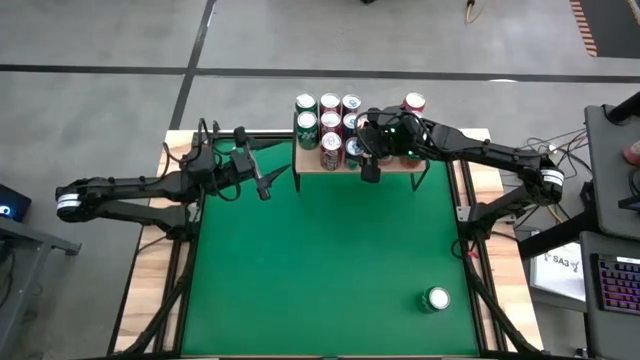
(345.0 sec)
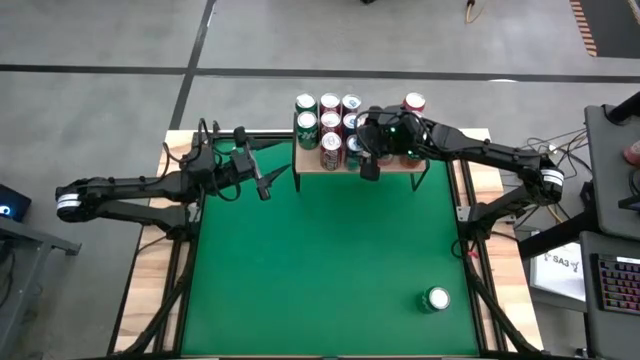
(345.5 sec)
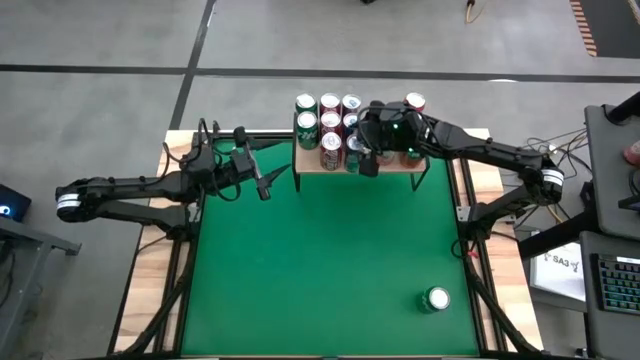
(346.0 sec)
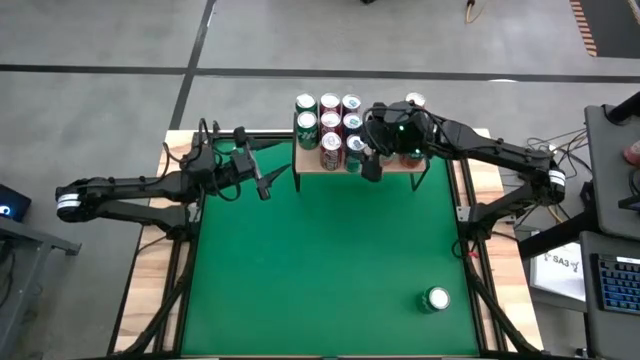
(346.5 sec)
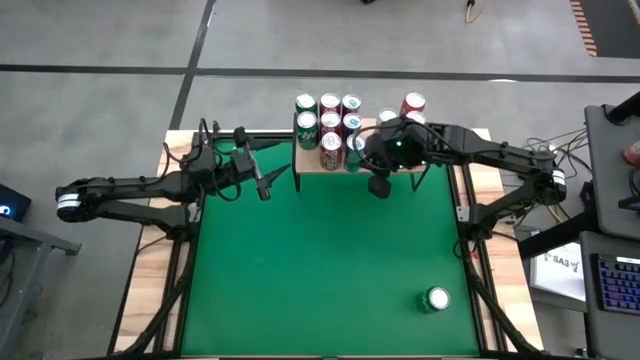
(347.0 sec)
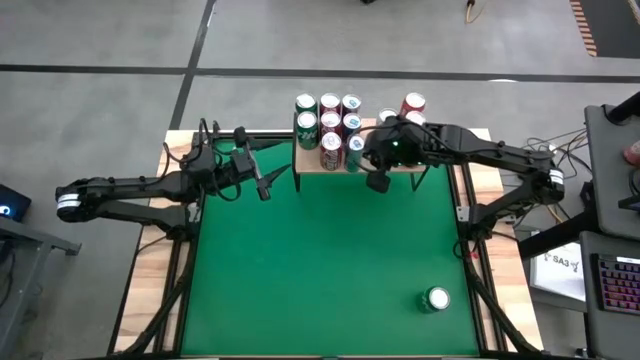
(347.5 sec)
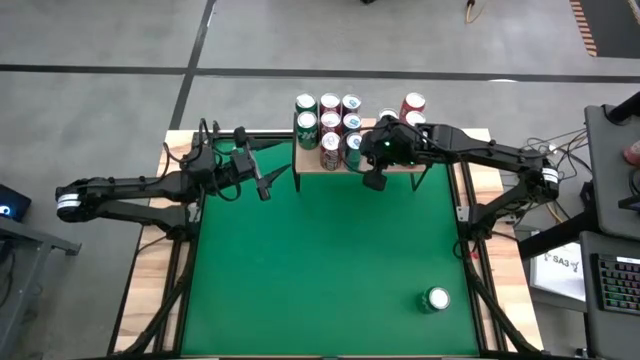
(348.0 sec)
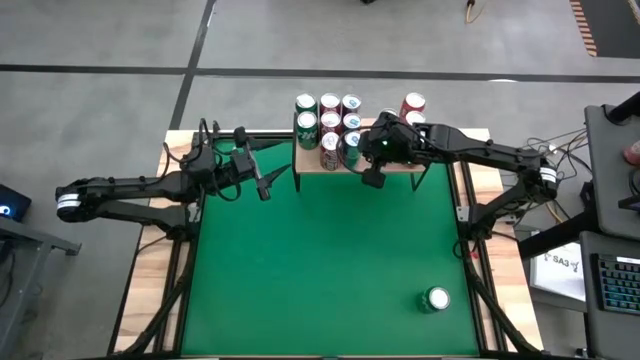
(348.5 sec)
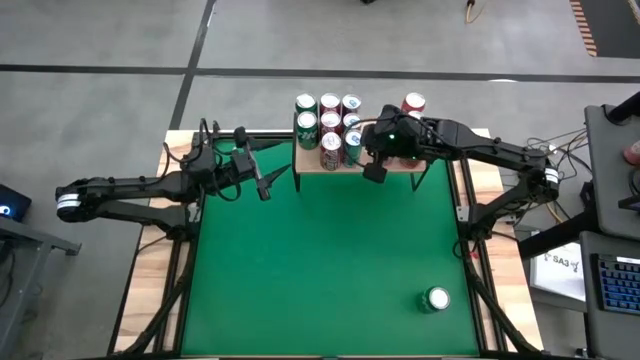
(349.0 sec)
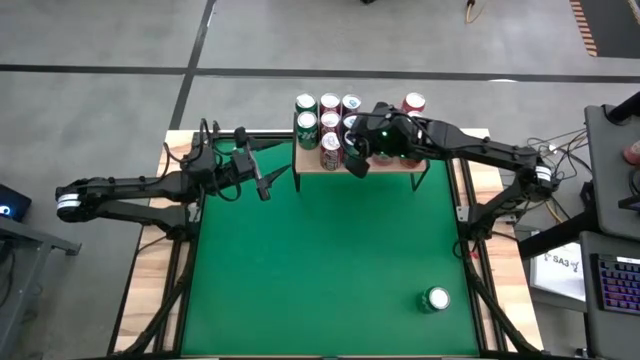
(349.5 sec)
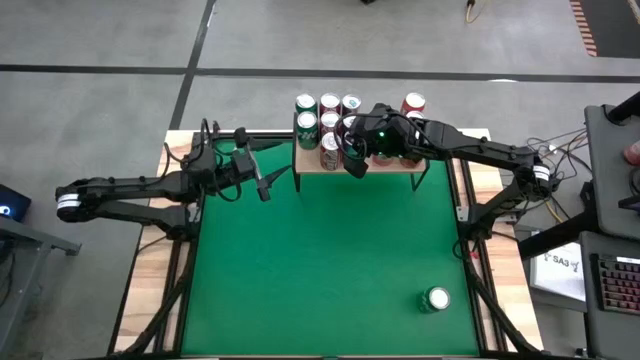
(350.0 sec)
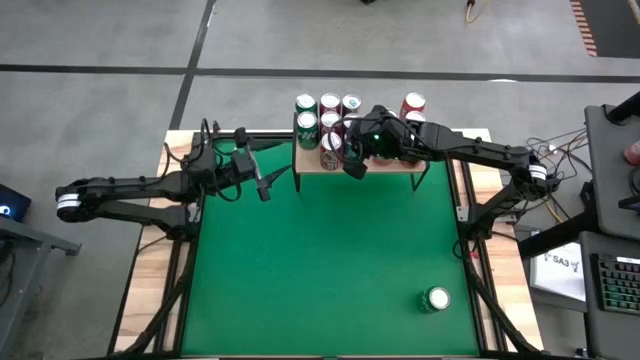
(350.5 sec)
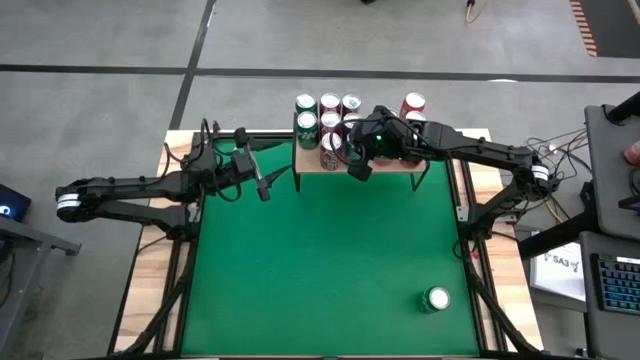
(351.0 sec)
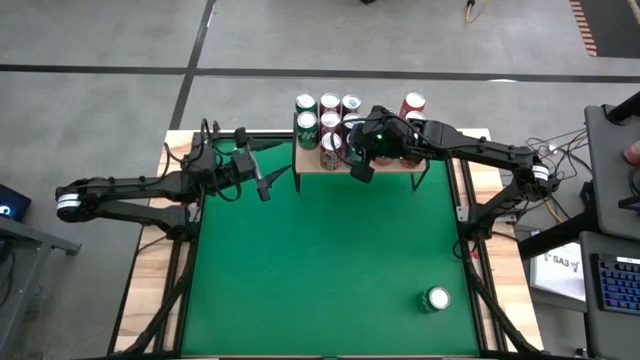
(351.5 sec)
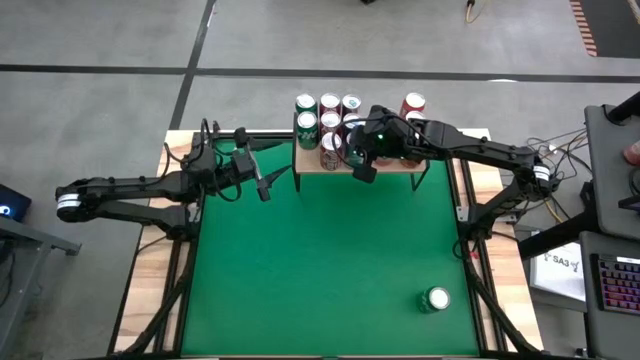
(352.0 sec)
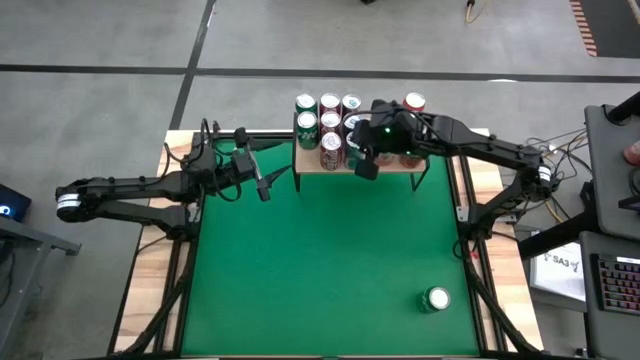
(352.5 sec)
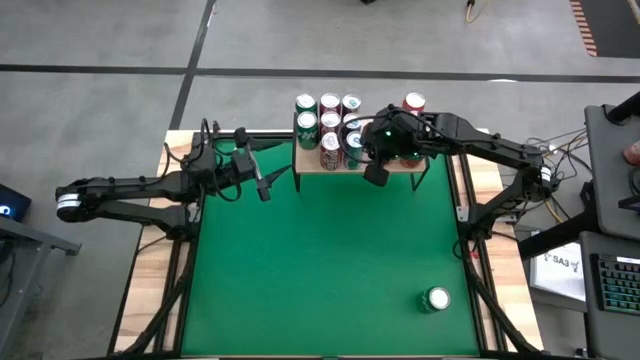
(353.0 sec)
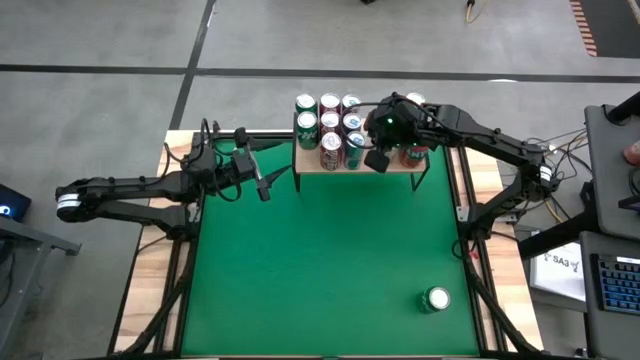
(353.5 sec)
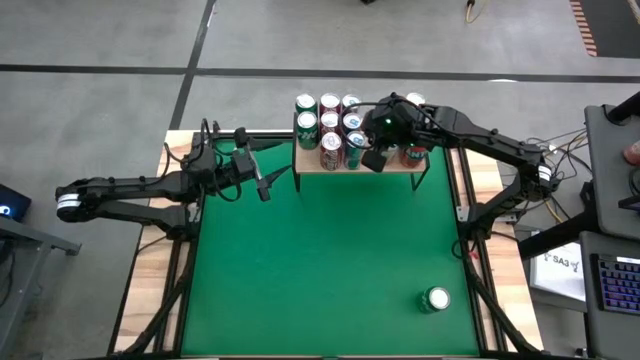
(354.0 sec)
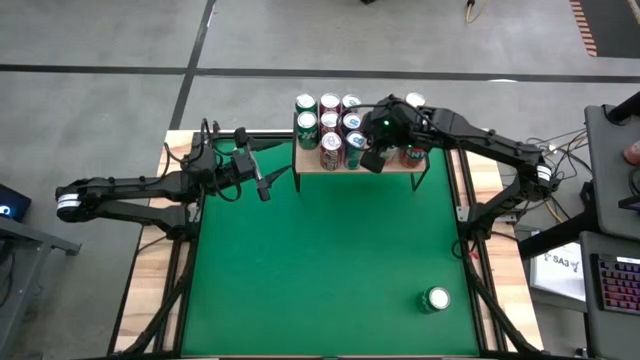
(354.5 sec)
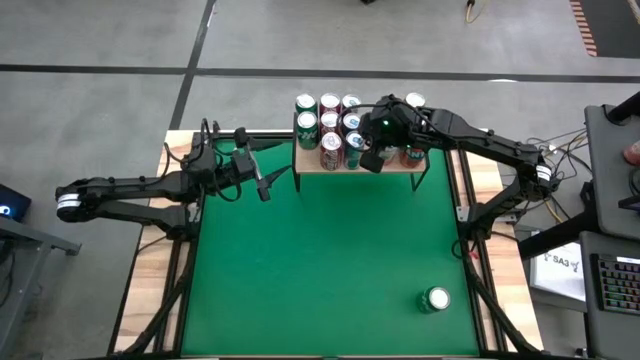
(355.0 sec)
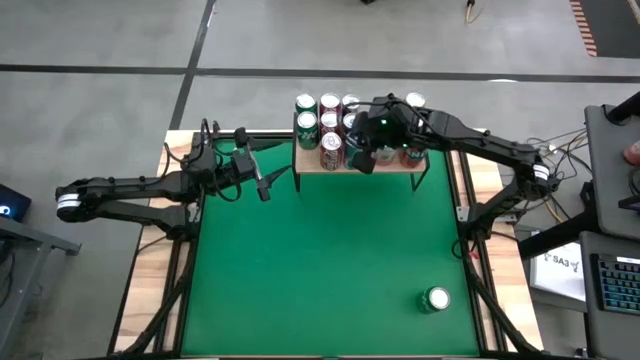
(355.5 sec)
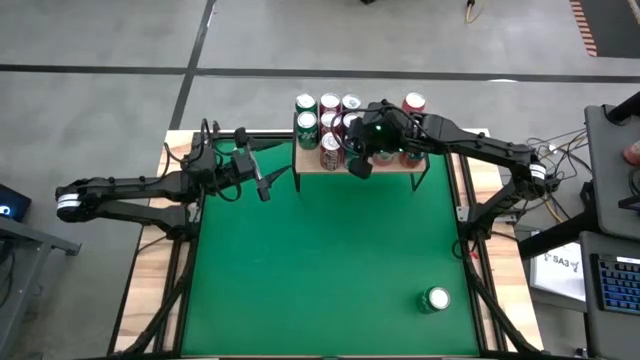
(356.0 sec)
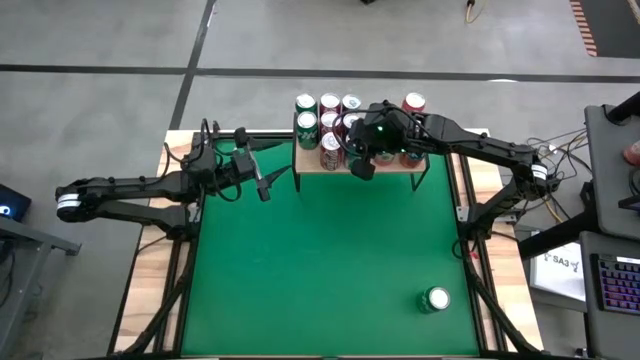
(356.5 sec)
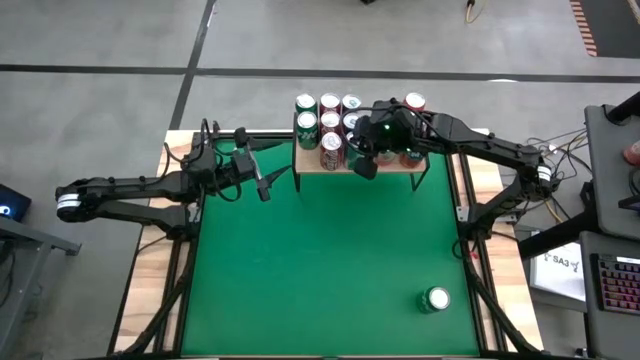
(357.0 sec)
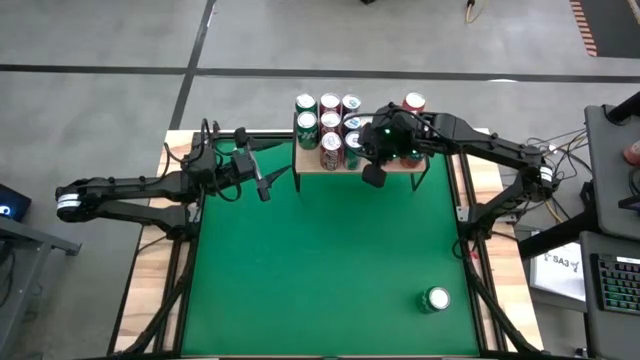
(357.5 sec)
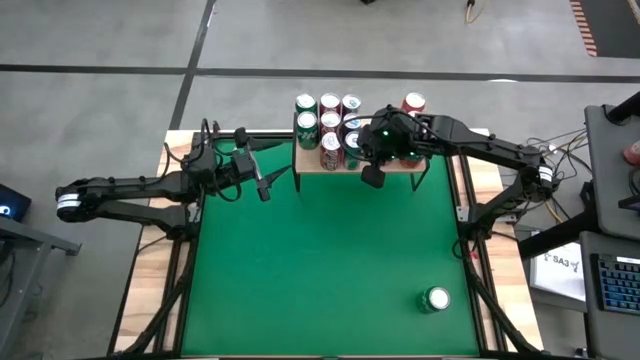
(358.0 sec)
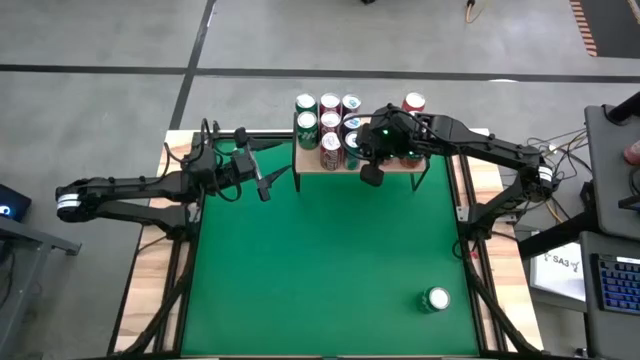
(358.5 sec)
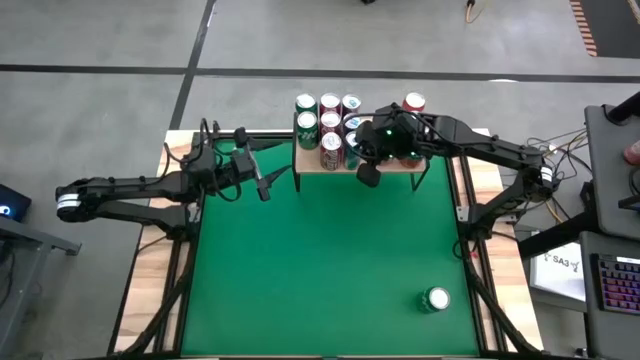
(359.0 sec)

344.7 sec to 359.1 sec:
Task: Place canned beverage on shelf
Put the blue soda can aligned with the blue soda can on the shelf

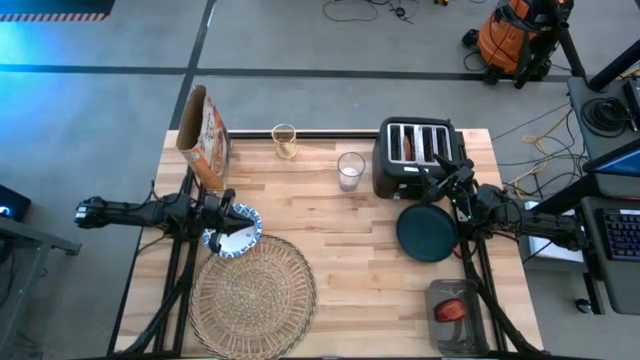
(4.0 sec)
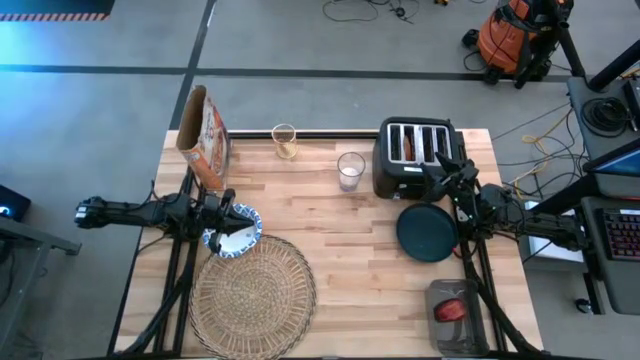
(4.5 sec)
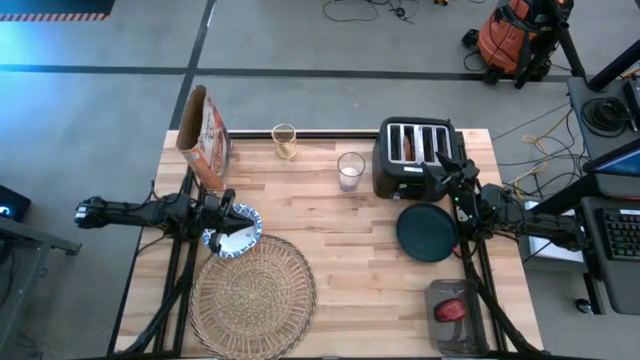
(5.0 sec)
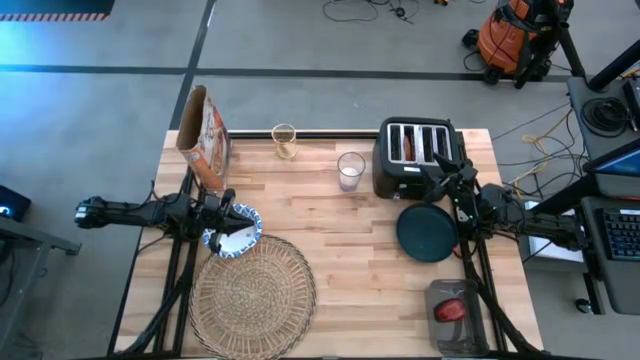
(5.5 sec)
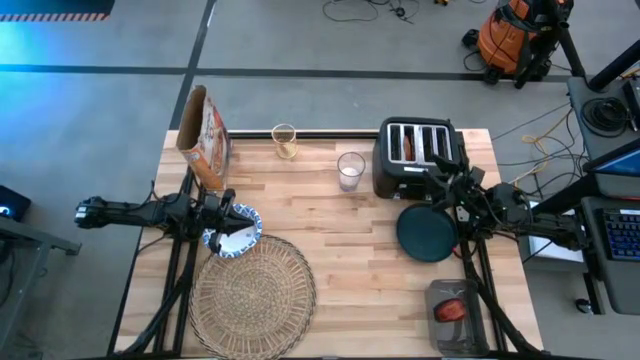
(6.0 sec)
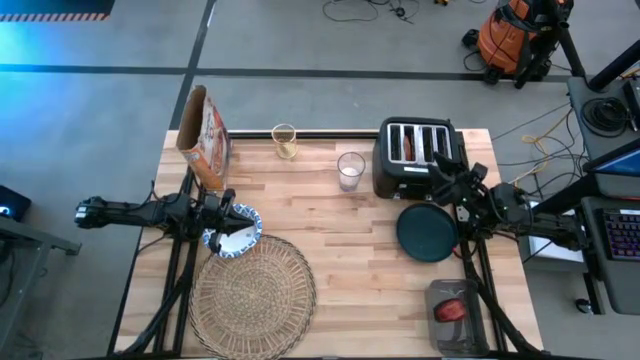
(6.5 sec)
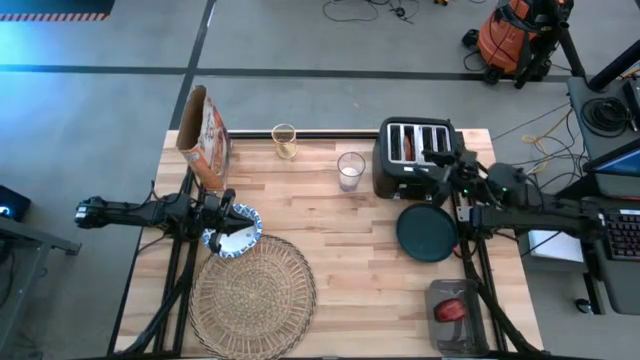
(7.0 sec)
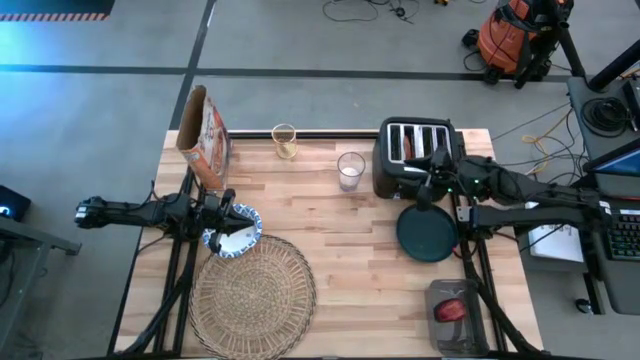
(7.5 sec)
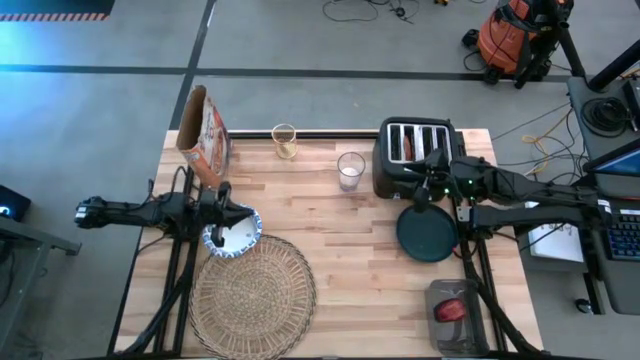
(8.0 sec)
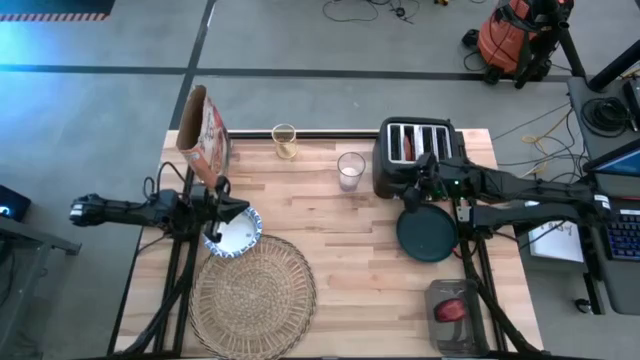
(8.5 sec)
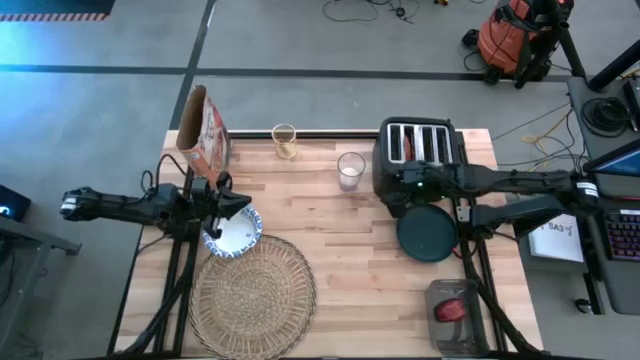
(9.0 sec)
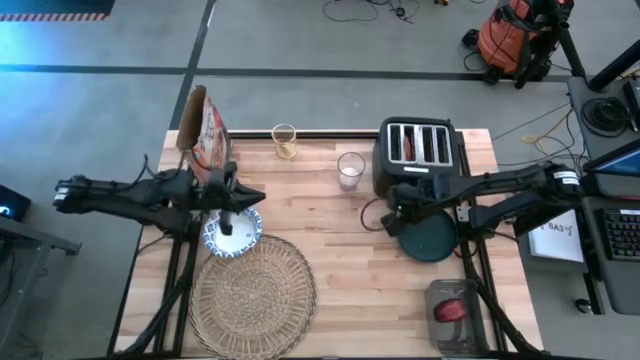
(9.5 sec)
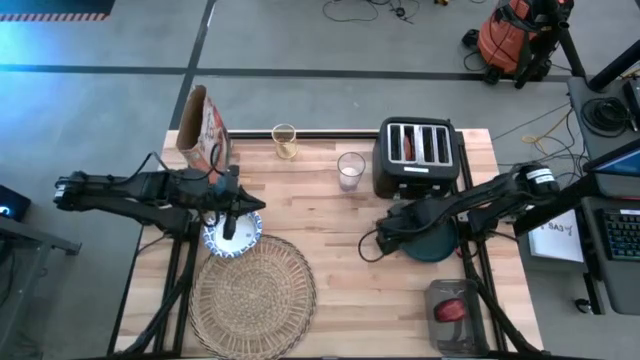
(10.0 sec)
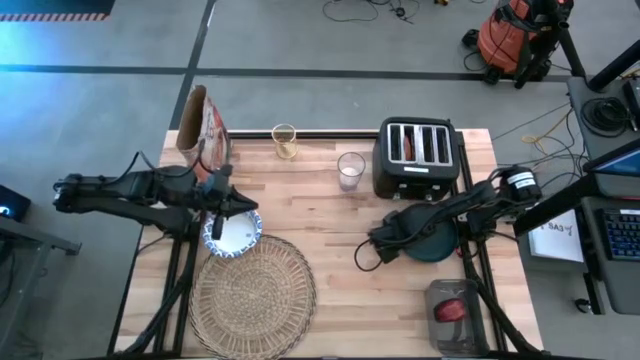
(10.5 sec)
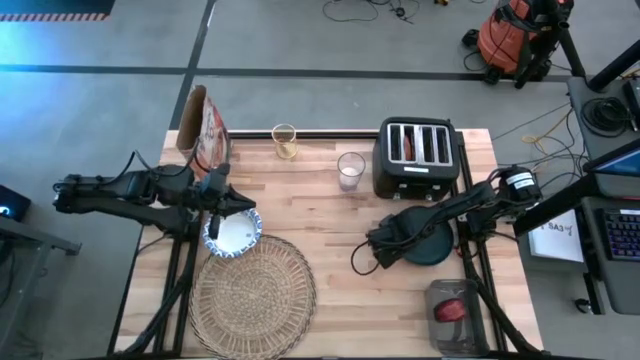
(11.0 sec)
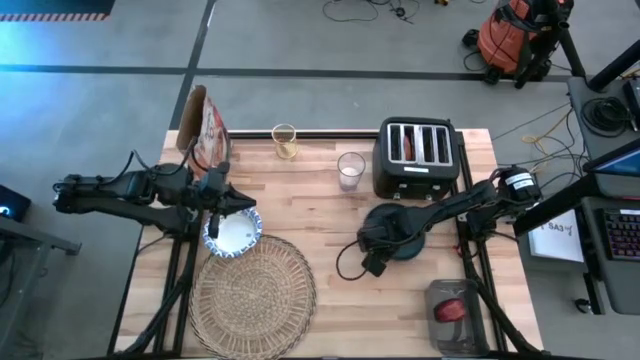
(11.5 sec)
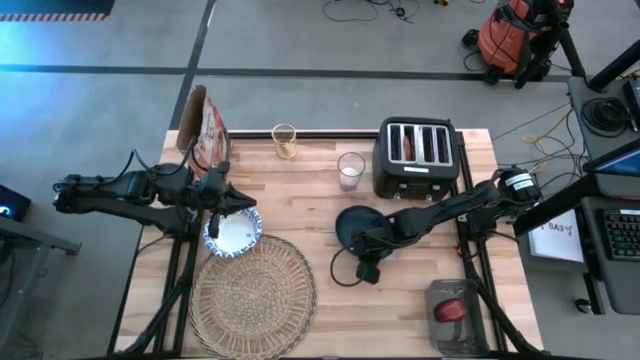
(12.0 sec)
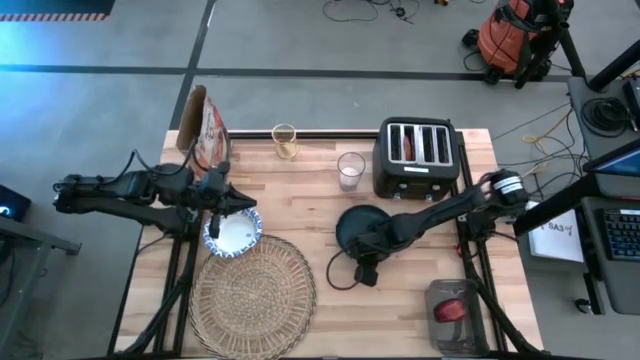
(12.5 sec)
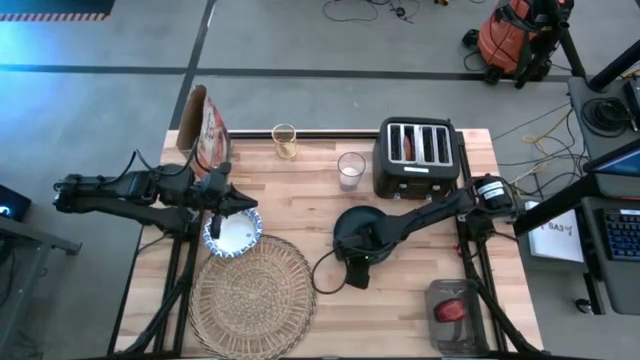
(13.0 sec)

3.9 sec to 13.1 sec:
Task: Arrange a breakfast setting
Move the black plate to the center of the table
